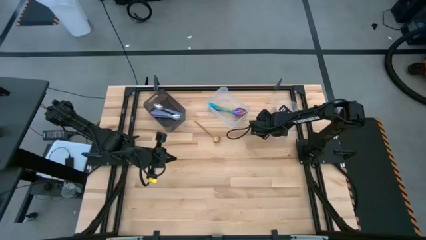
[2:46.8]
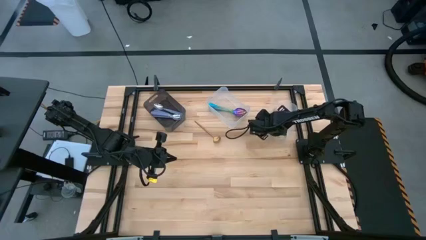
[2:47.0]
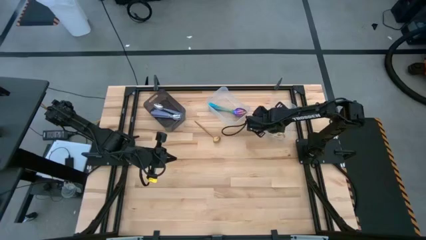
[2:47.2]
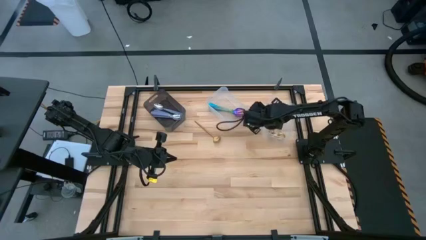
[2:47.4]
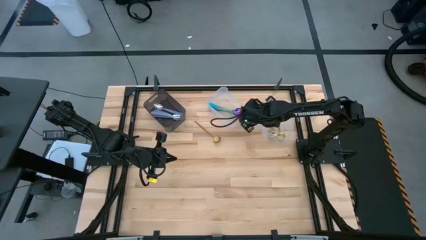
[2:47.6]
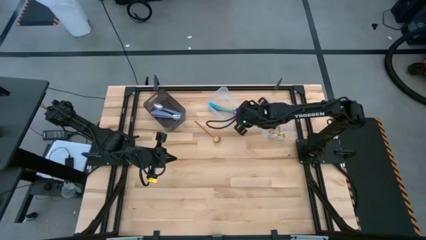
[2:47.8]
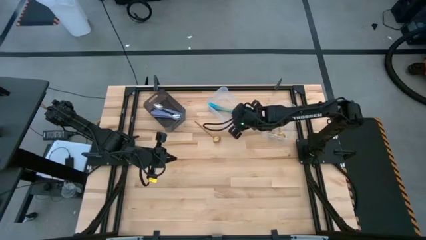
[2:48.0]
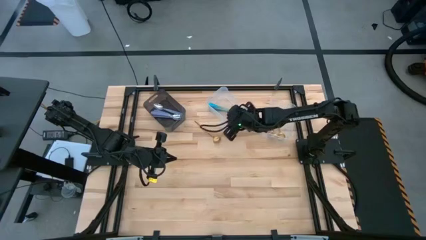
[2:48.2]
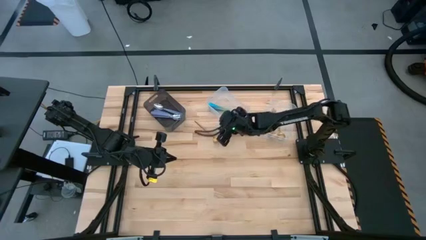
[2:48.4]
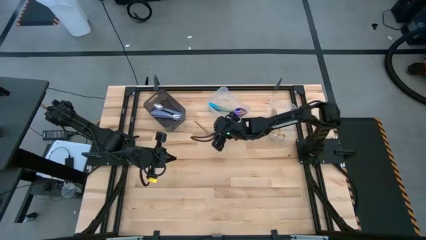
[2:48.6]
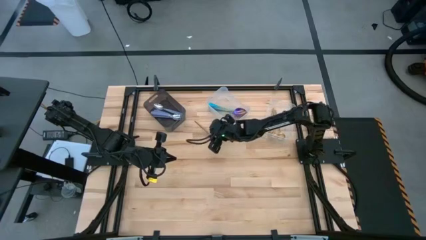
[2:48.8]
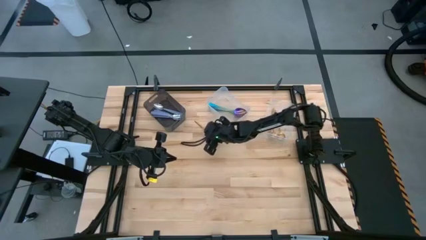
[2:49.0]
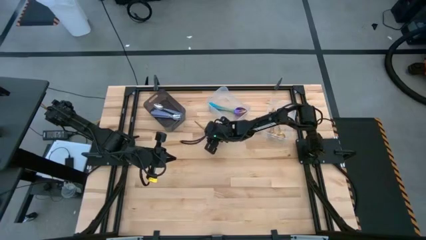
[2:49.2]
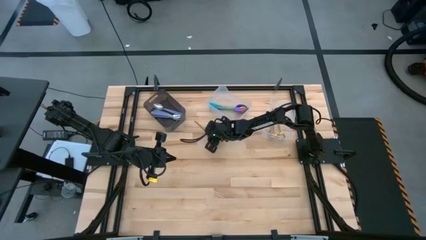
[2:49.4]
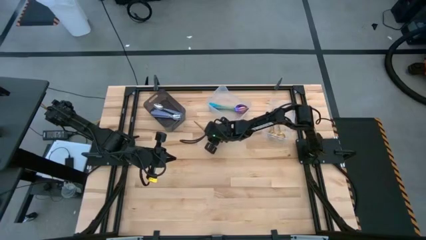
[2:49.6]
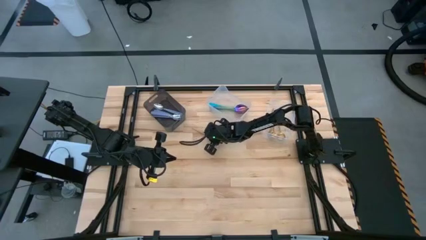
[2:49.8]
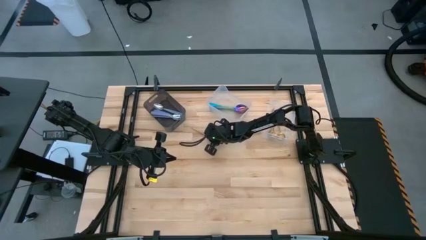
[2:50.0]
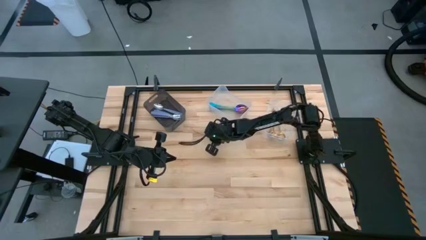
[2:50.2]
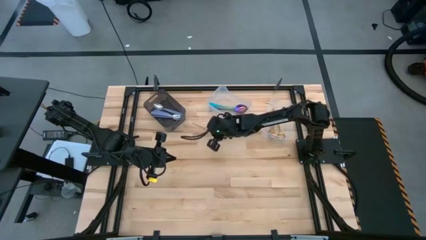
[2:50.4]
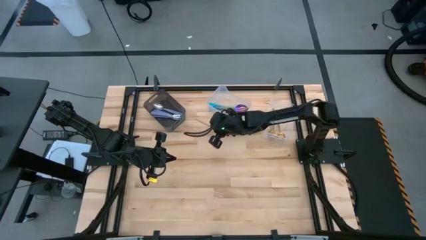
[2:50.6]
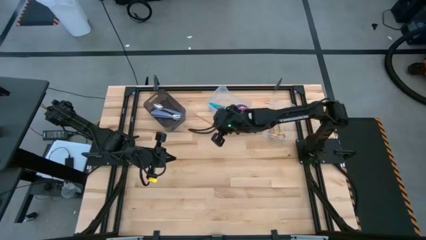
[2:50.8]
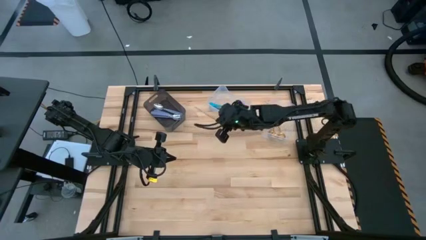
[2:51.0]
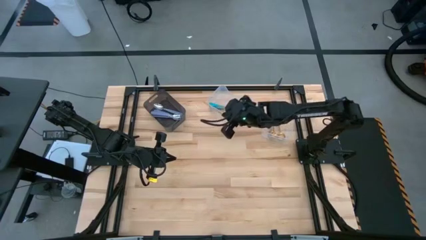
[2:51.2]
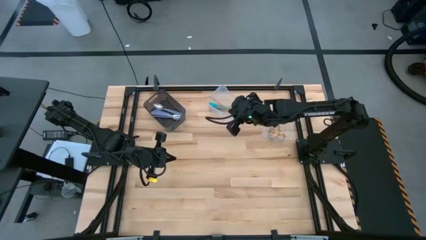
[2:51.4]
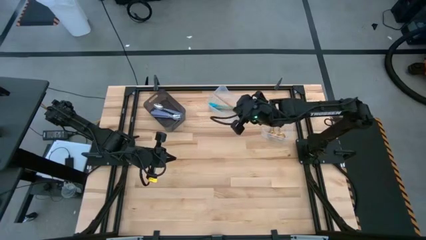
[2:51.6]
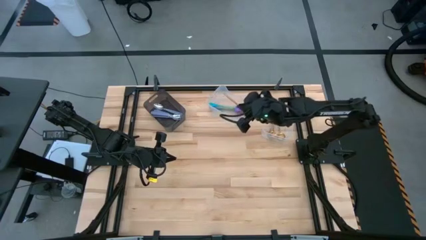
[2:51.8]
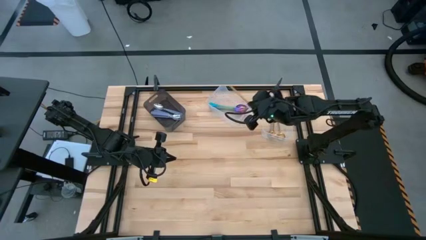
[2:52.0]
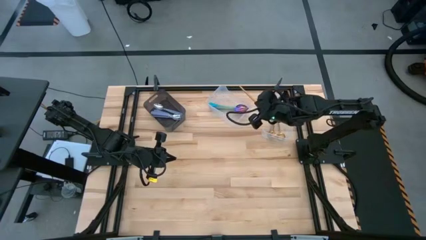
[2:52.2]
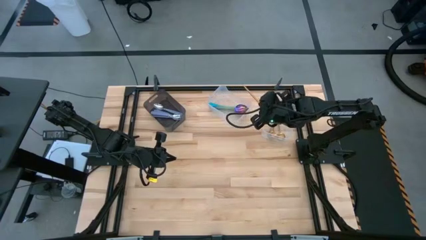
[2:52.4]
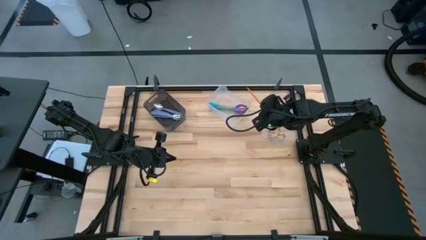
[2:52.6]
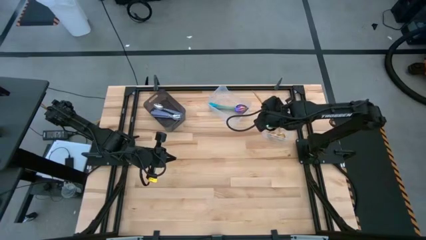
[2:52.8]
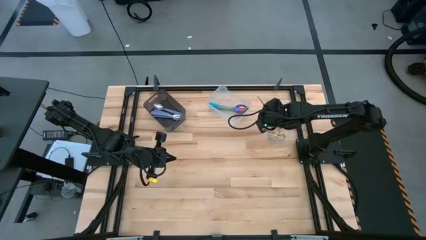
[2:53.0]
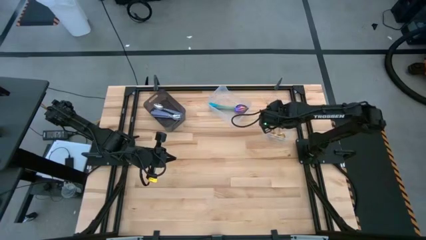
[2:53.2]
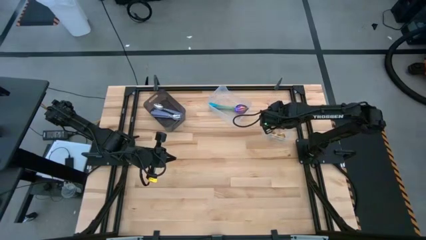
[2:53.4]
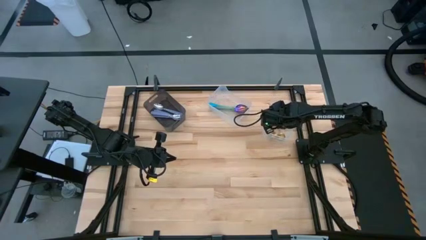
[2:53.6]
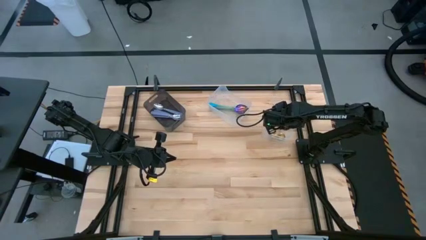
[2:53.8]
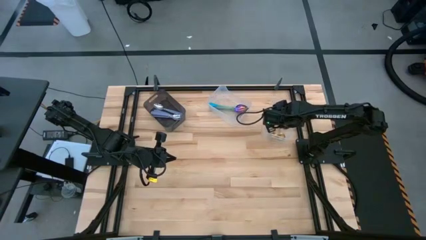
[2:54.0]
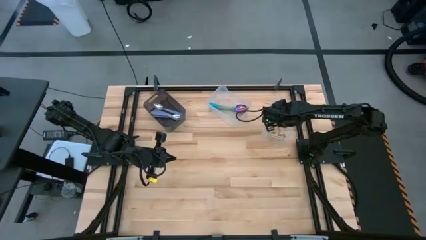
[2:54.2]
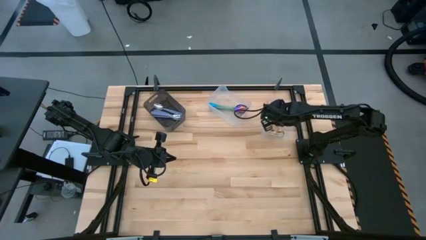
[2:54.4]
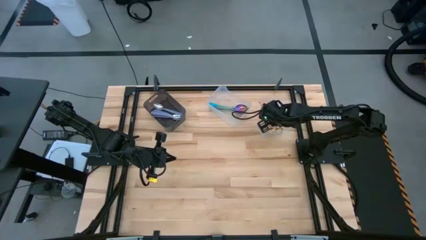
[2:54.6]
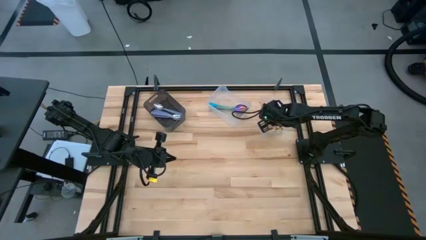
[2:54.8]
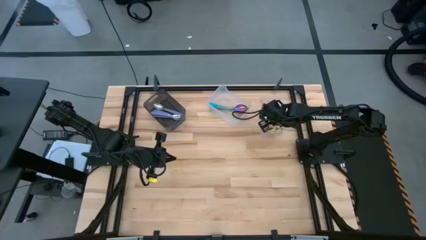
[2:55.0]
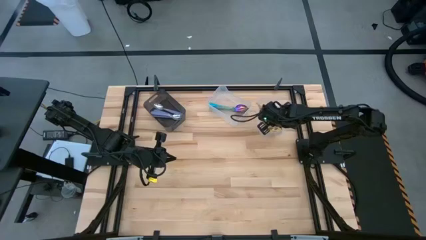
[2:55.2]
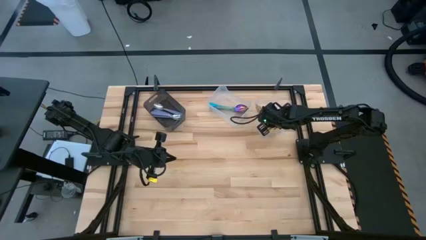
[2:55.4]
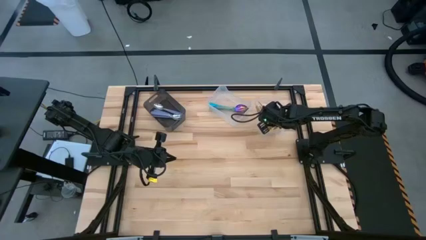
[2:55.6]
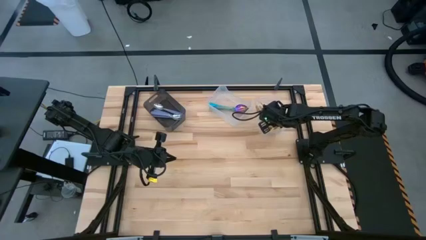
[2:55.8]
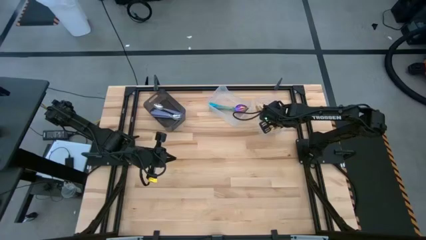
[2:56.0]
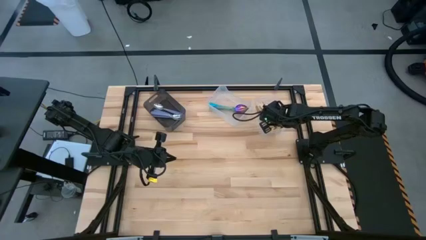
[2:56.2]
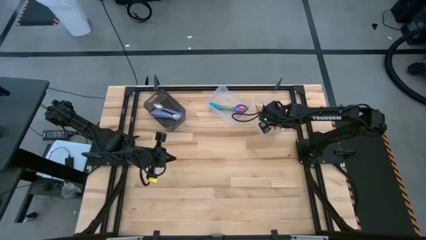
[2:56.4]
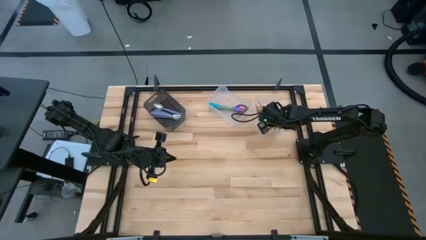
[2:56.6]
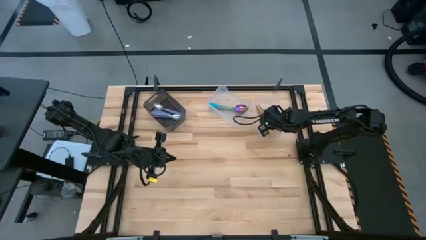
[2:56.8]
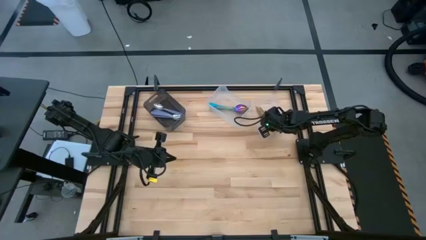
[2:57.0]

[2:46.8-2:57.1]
Task: Sort silverware by color (type)
Put the gold spoon into the right transparent bin

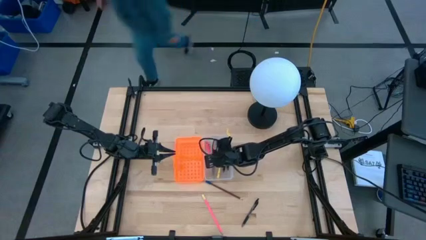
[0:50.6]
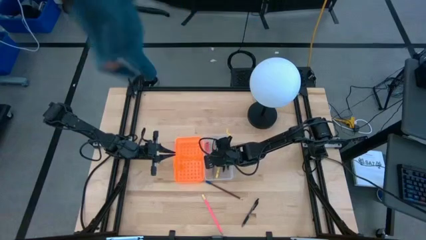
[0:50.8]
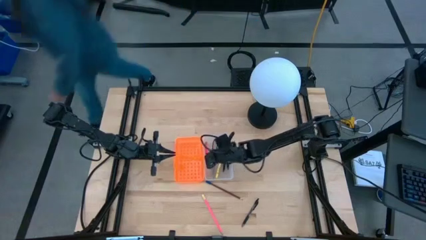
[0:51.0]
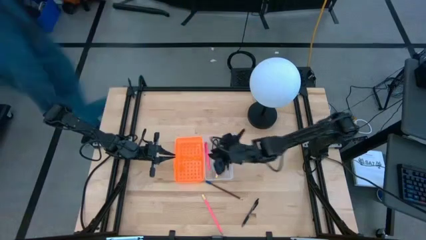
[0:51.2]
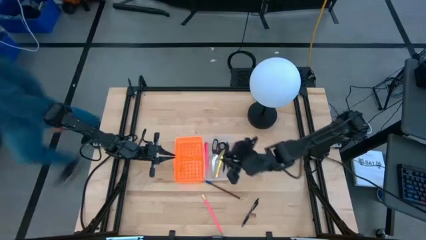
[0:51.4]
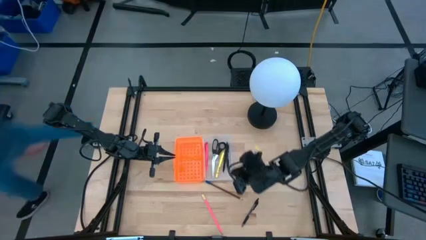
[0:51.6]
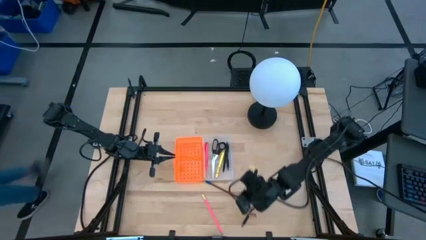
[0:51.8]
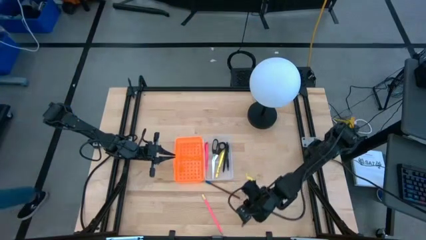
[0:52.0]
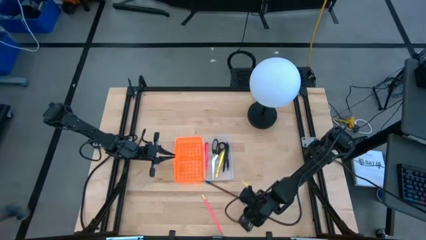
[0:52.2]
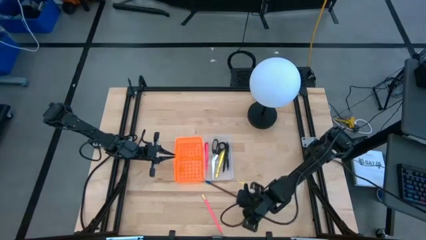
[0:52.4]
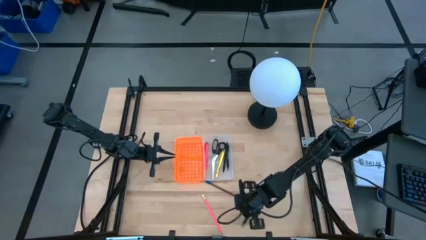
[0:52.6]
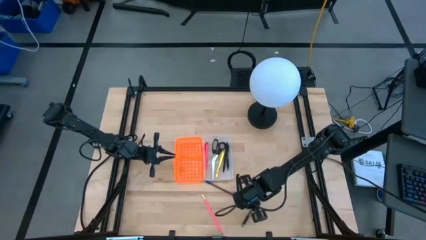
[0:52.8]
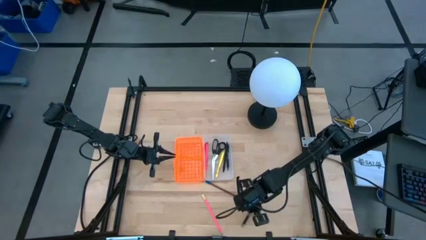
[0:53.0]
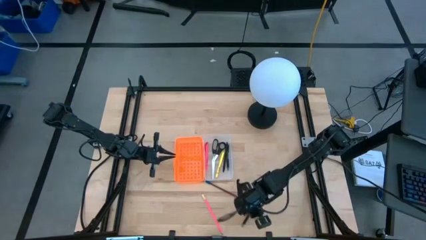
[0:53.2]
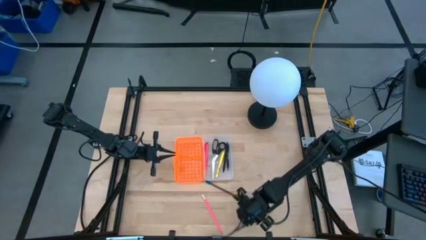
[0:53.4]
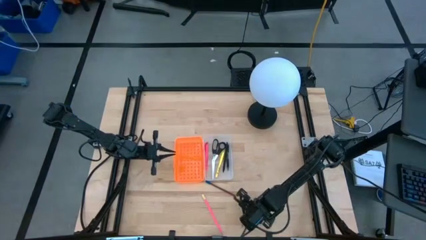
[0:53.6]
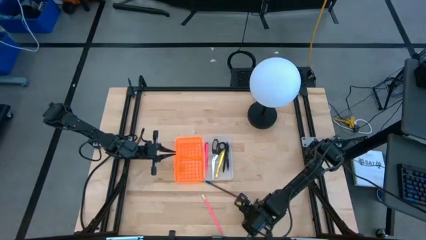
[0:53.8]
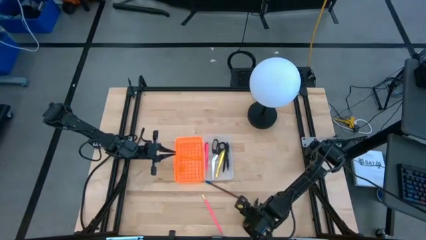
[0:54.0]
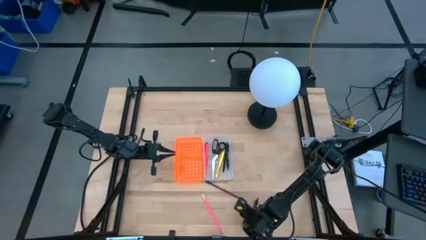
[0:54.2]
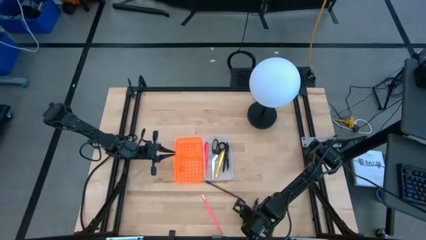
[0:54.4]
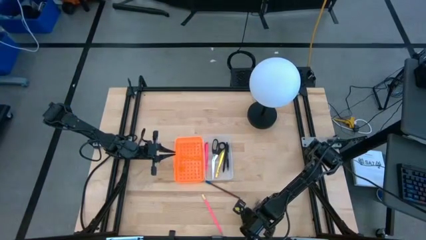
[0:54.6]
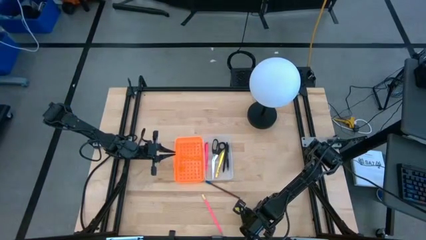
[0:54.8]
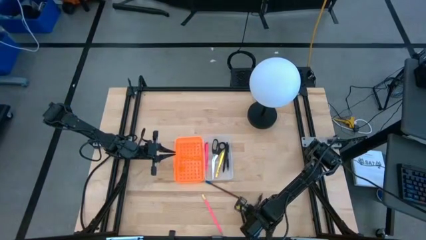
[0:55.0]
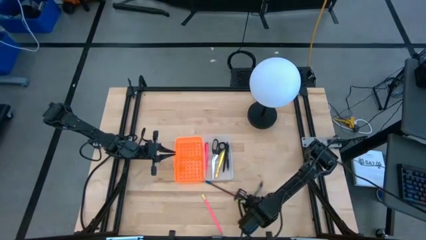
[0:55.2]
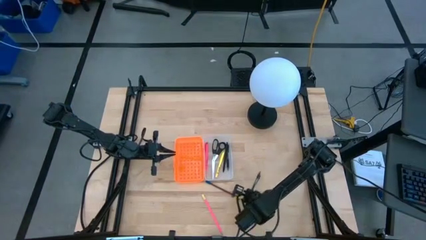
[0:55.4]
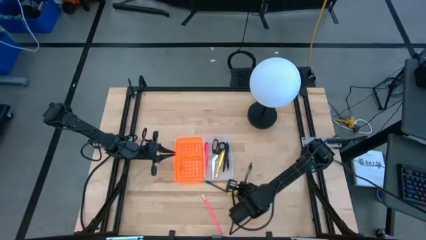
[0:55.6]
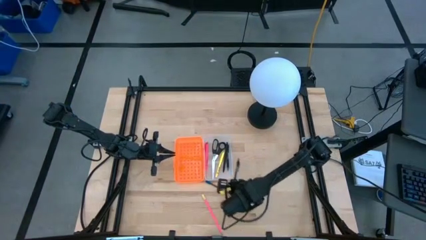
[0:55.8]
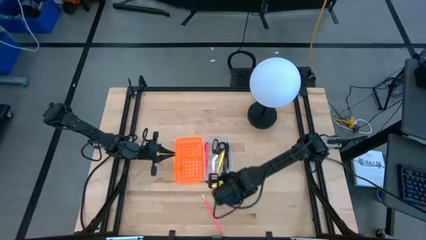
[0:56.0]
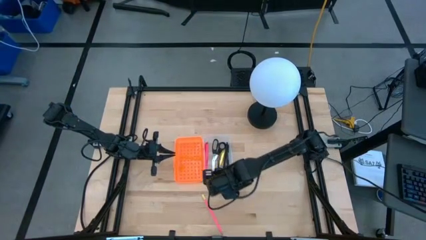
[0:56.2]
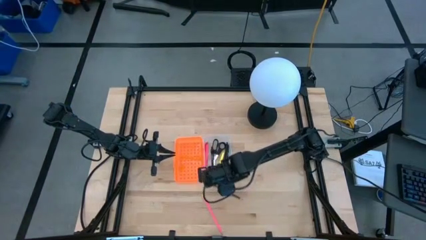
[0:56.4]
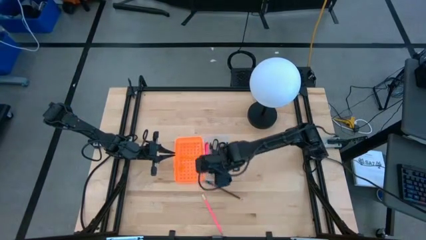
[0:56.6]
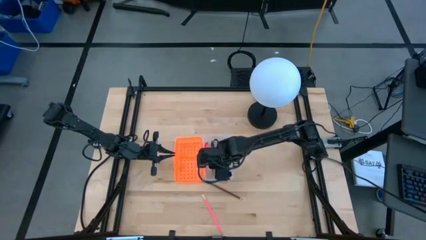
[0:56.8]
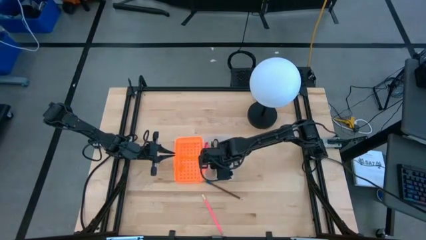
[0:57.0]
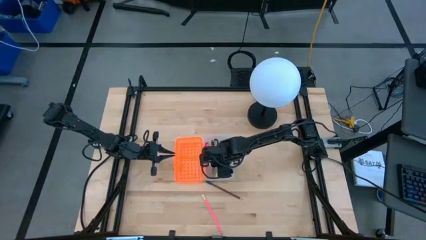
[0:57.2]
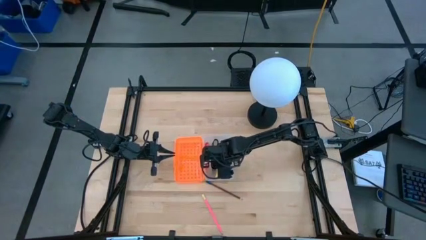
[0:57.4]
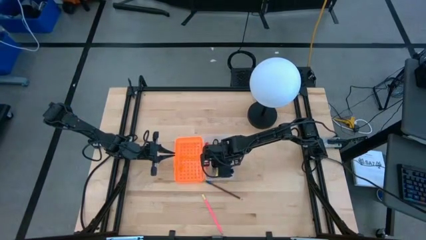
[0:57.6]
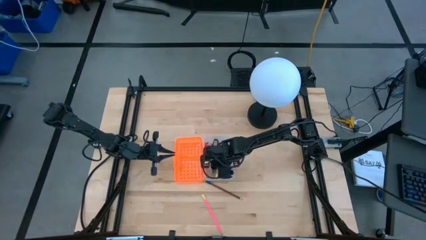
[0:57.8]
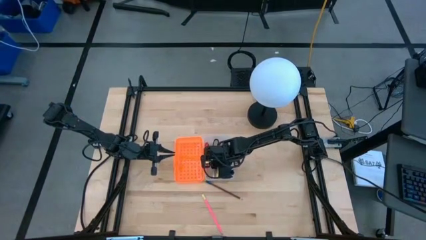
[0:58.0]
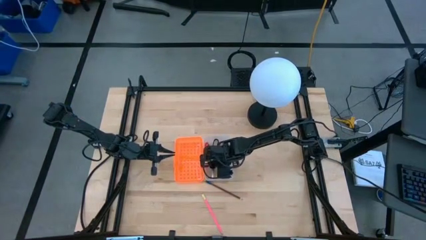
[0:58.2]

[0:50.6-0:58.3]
Task: Pick & place school supplies into a supply box
Put the black pen into the supply box
